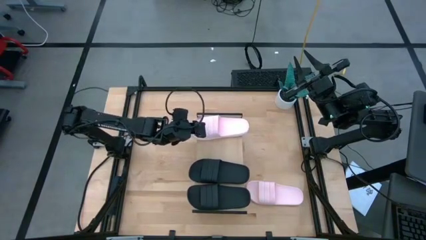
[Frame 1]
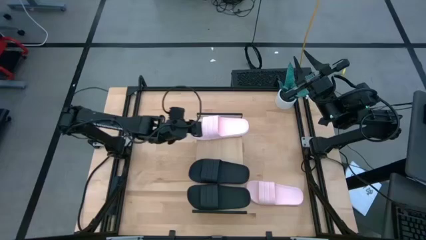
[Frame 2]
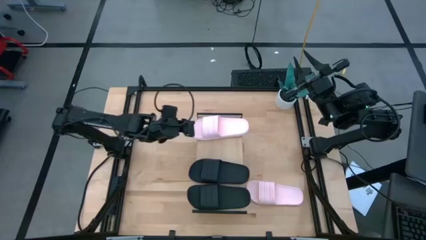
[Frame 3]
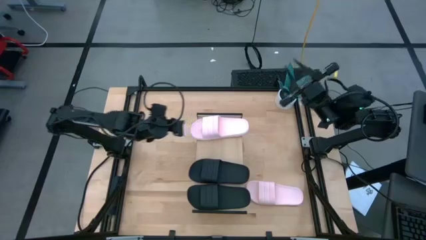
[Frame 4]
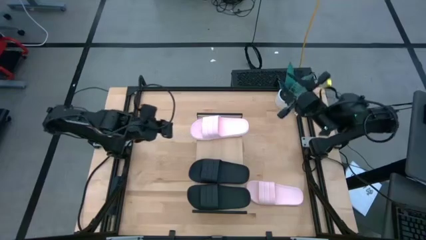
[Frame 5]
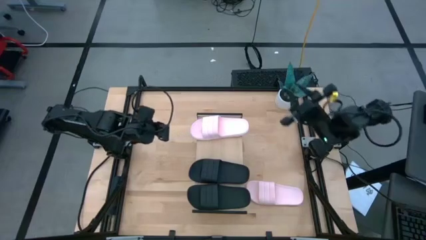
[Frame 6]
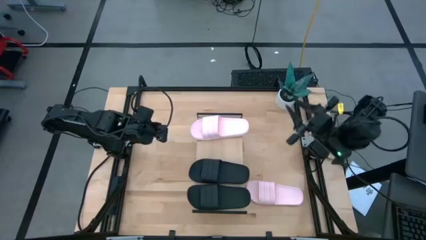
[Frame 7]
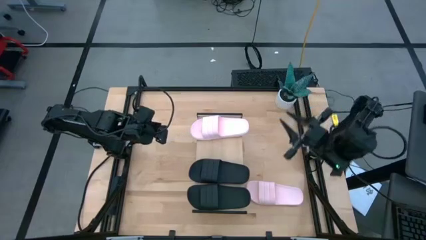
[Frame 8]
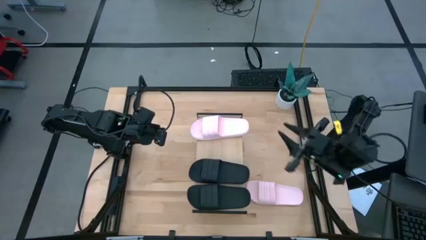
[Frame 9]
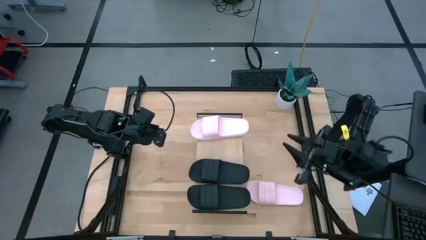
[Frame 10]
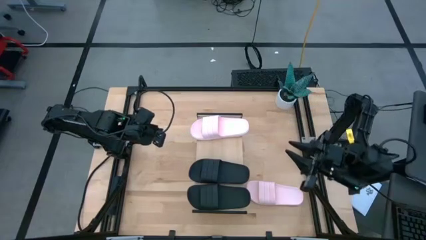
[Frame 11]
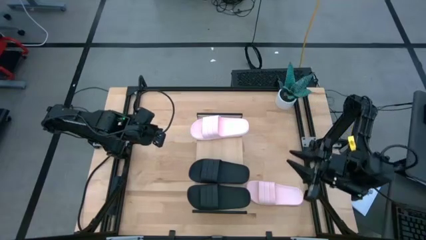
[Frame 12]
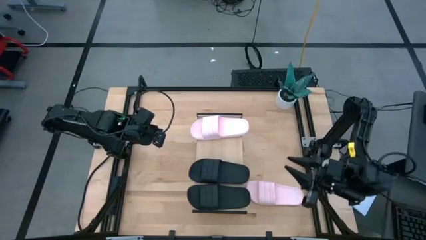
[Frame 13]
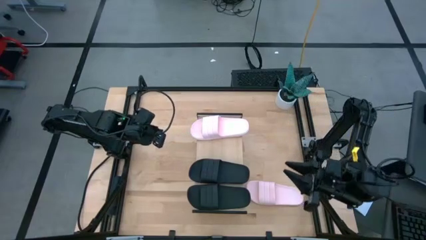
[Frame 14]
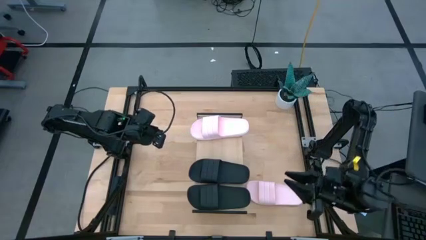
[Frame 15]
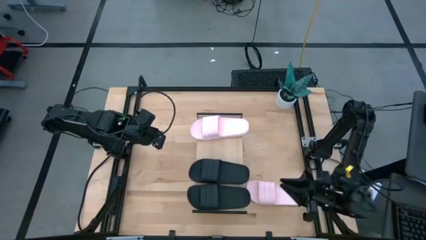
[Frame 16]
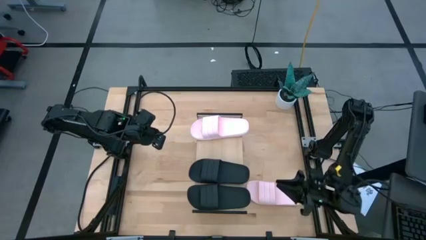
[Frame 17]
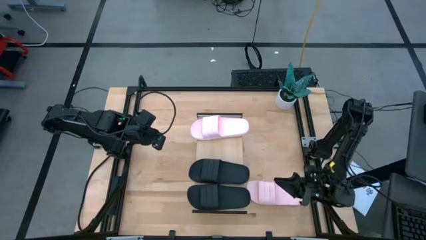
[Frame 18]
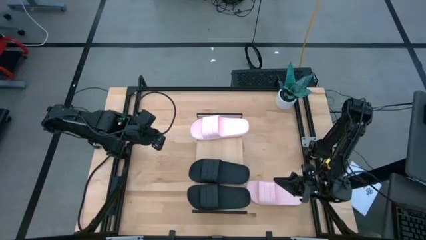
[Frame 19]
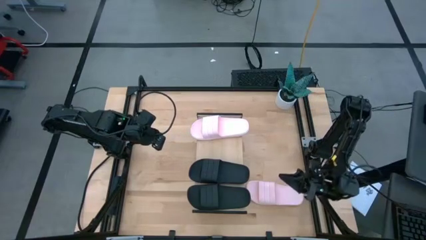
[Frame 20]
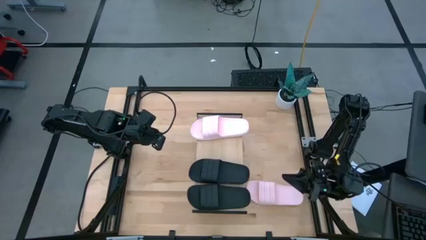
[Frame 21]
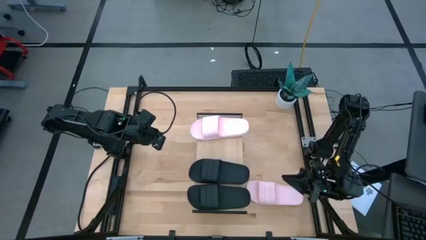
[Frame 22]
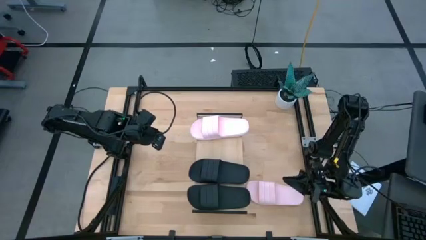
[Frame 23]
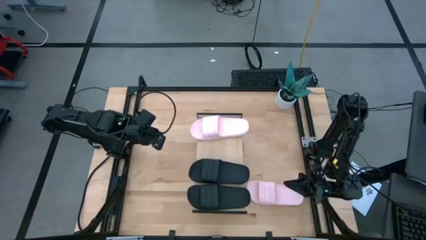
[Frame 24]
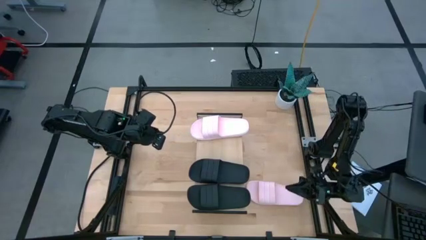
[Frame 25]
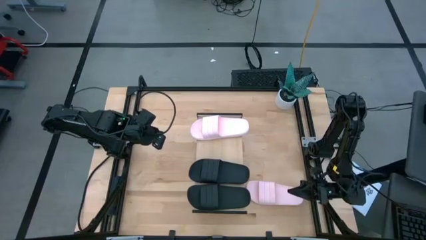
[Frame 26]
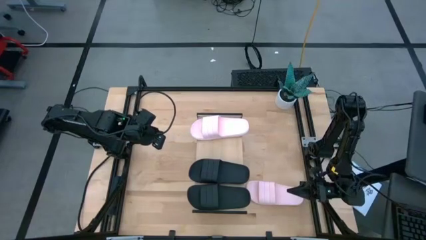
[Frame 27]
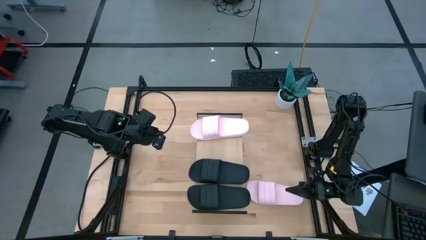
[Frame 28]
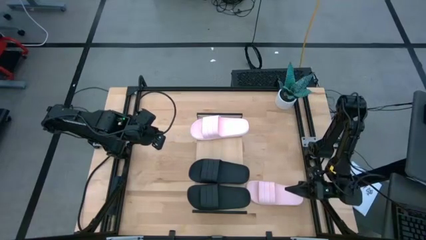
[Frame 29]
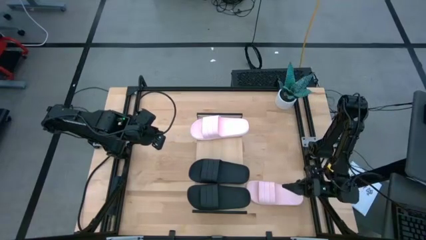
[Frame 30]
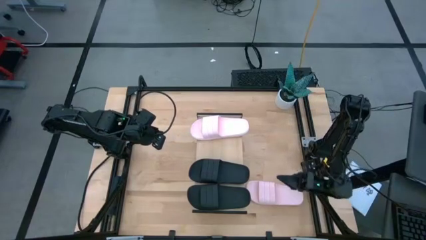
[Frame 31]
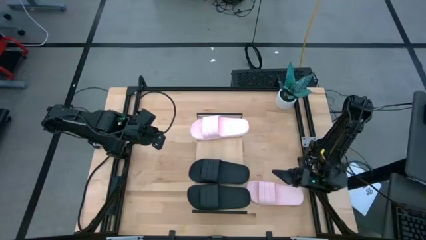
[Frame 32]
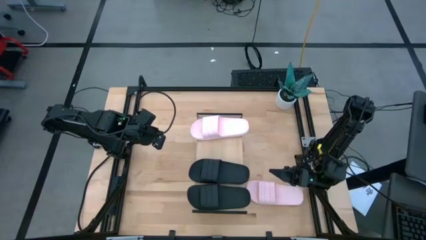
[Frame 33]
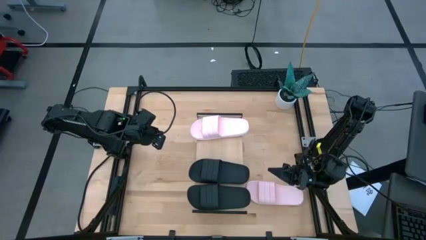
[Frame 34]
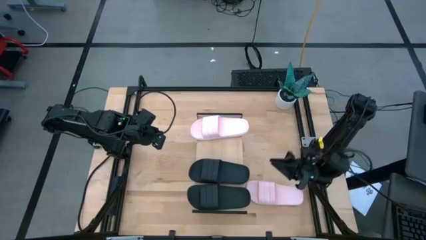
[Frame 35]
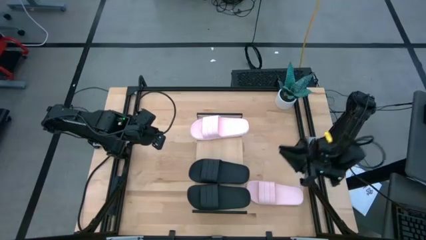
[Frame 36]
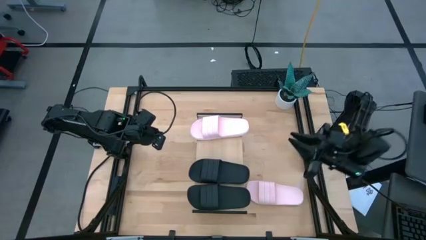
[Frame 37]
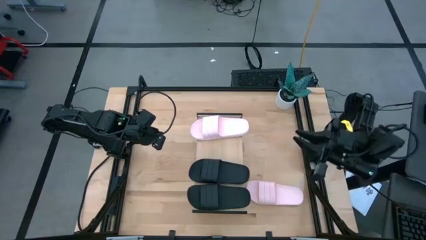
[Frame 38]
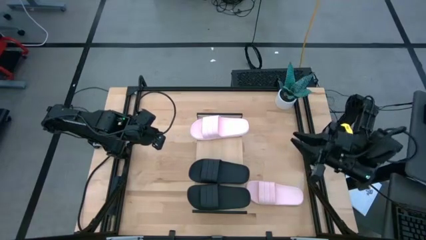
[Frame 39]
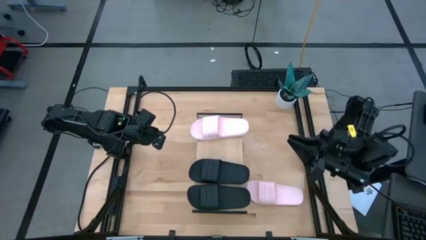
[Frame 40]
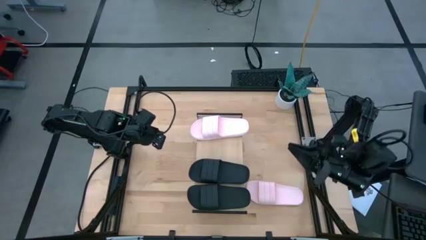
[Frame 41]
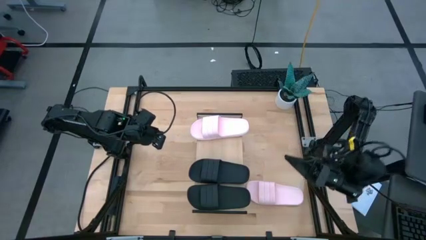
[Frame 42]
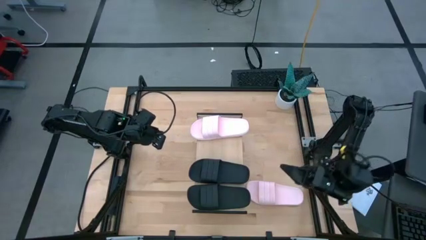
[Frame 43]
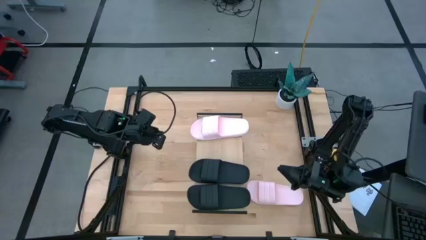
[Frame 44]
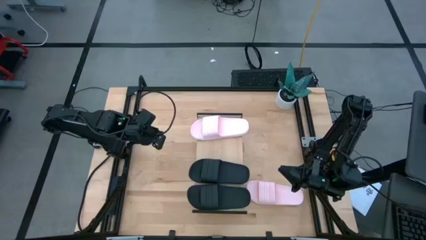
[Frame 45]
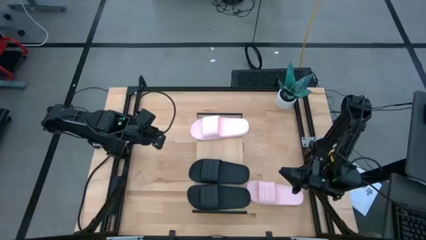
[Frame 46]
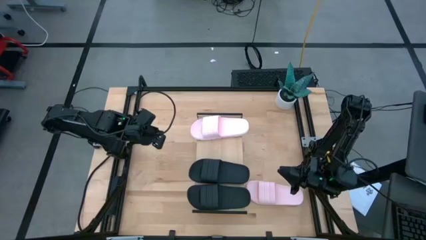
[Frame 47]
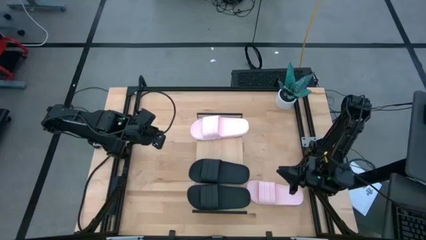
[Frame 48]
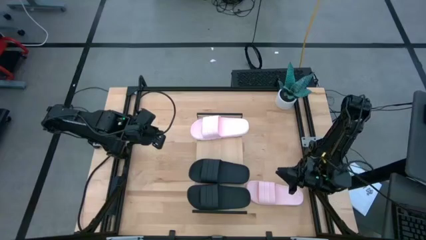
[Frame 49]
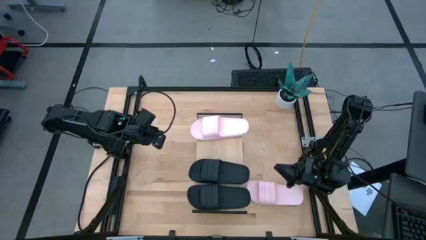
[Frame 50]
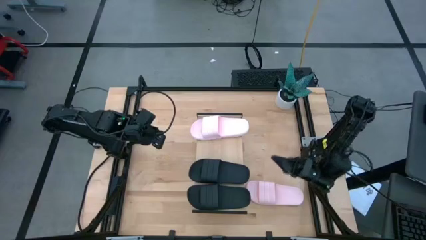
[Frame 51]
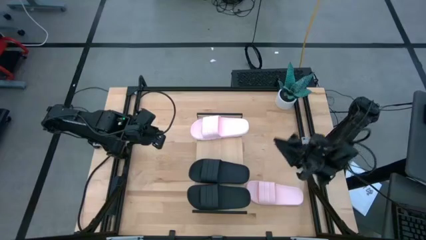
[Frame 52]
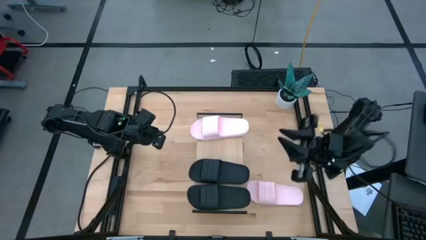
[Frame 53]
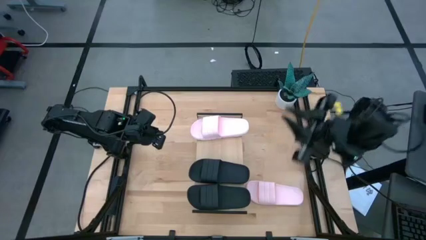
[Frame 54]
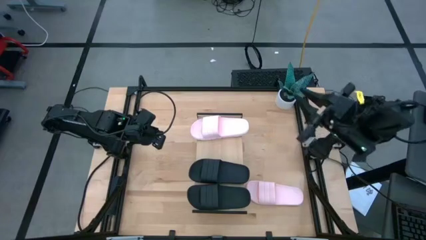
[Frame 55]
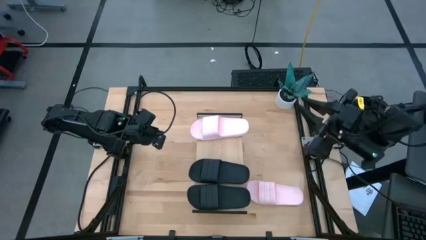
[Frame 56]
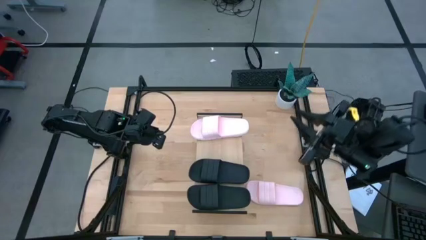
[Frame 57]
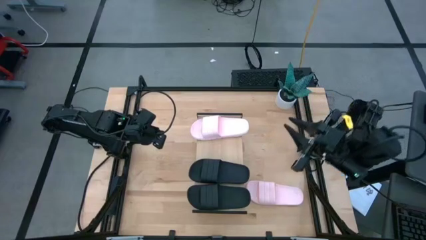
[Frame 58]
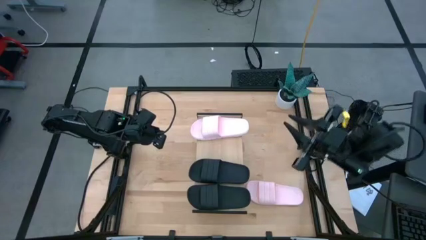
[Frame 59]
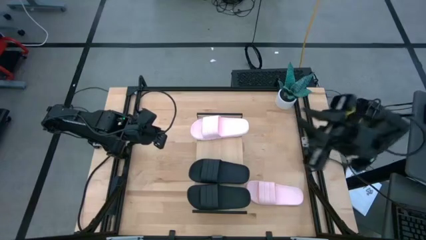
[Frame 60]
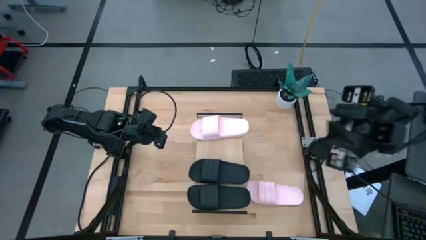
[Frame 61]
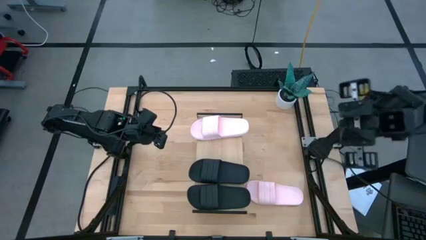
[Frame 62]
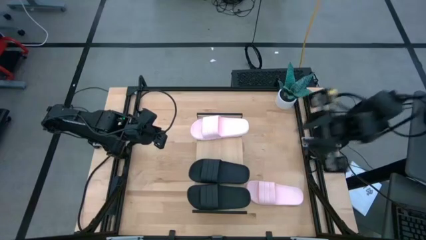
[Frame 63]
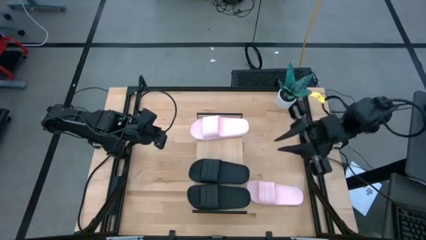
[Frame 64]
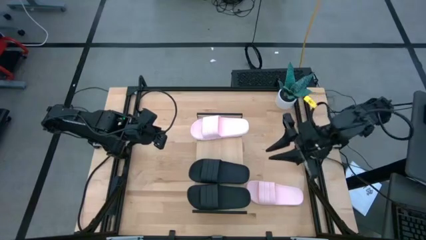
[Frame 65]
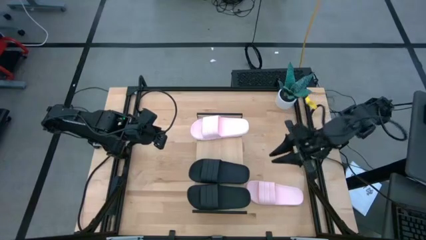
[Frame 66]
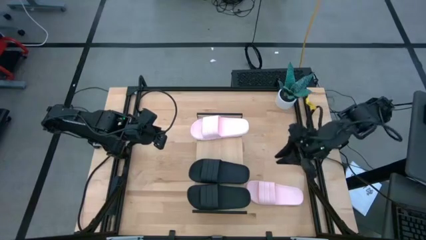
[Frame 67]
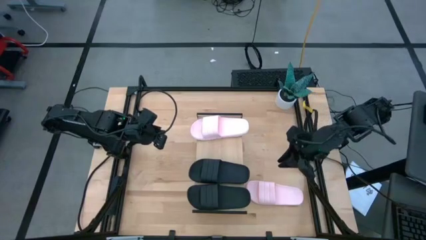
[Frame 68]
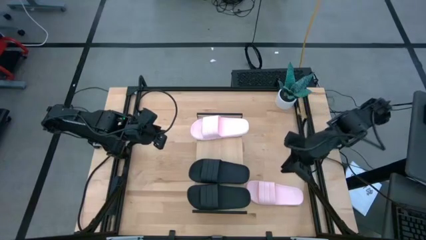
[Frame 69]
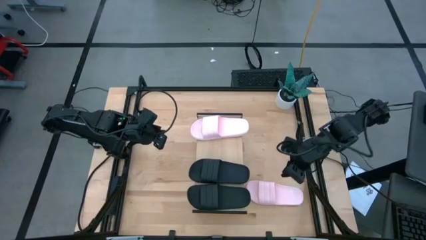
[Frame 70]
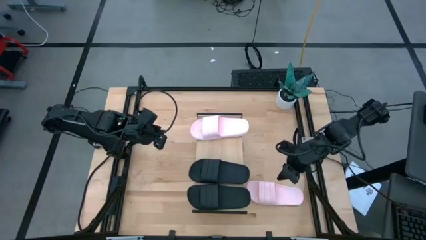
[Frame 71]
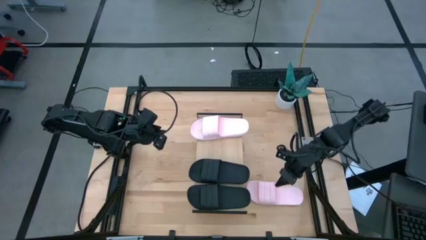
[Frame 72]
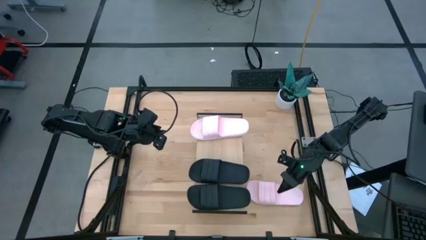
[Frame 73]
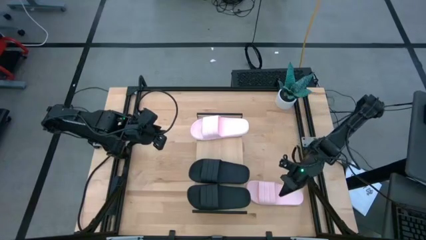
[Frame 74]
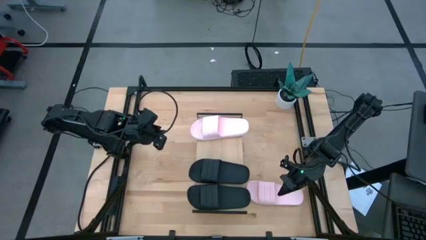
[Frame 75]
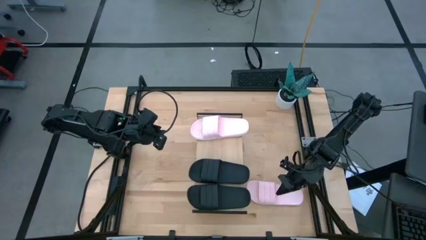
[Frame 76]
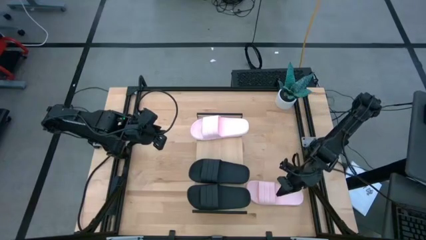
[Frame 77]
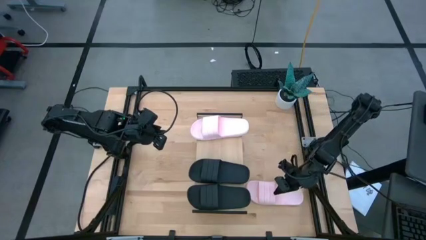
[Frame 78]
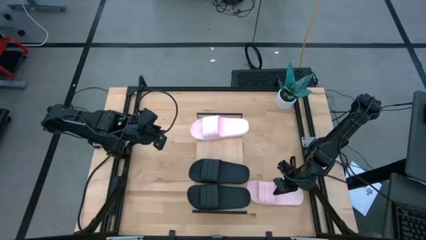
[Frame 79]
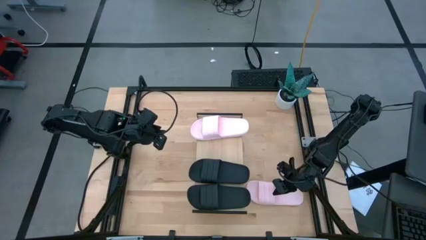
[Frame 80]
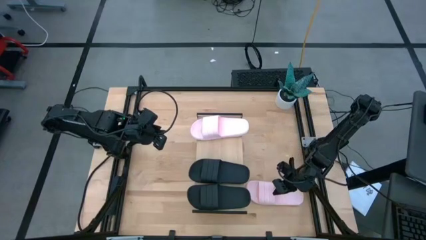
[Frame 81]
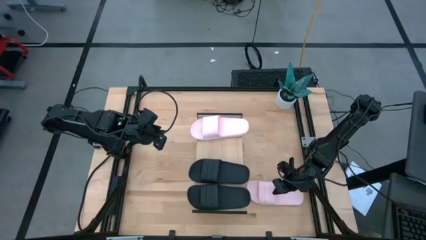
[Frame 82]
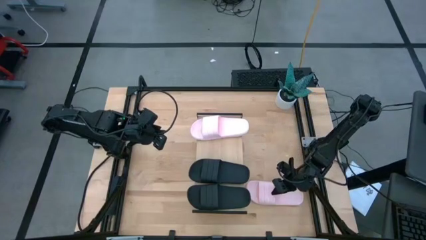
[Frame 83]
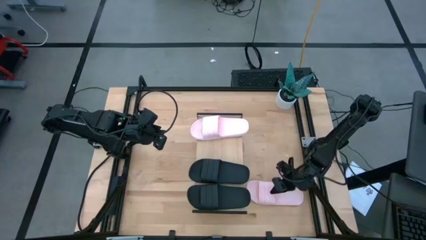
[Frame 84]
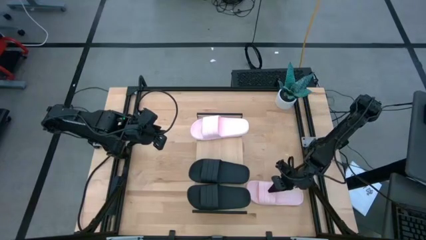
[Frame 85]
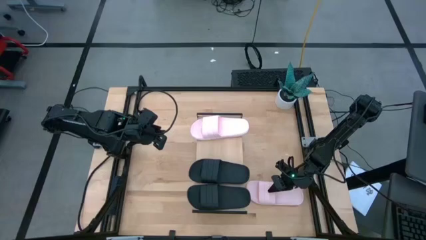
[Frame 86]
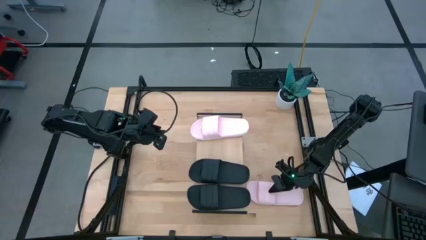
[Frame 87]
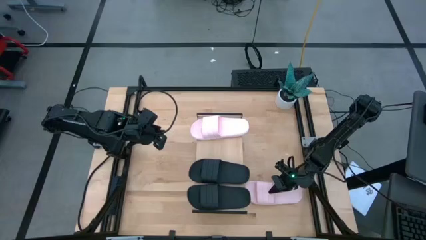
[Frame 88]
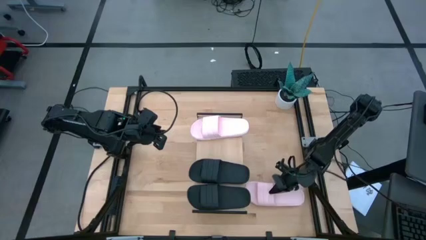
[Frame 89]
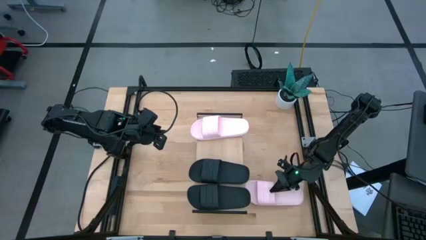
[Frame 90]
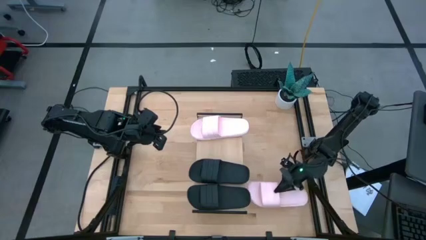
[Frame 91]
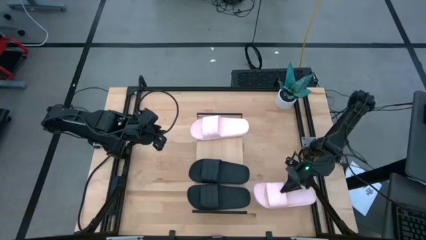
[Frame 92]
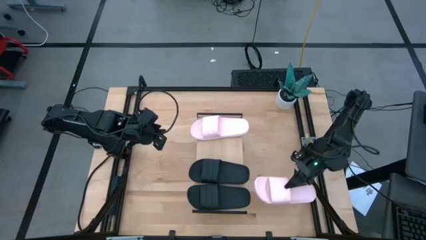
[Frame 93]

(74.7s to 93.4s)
Task: Pick and place slides into the shelf
Put the pink slides on the shelf
